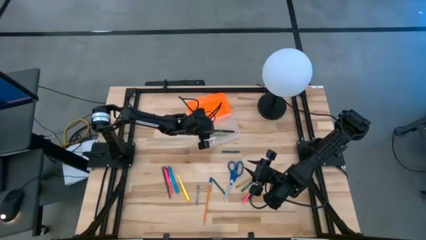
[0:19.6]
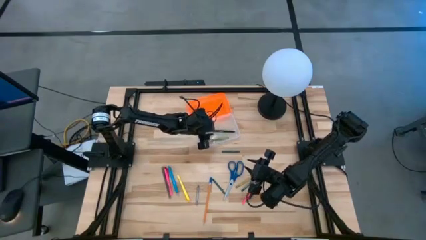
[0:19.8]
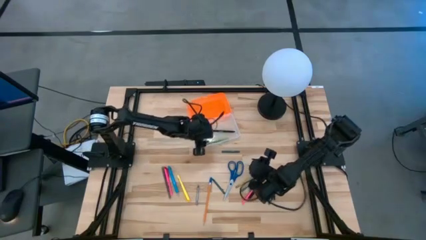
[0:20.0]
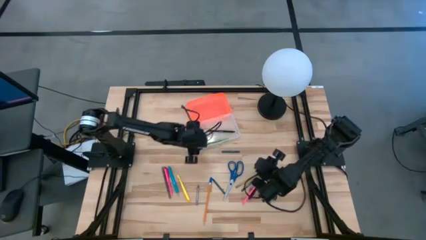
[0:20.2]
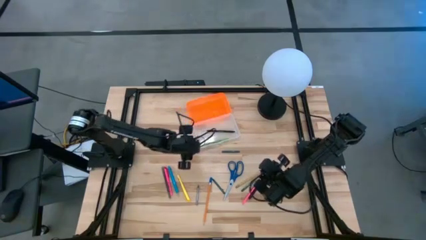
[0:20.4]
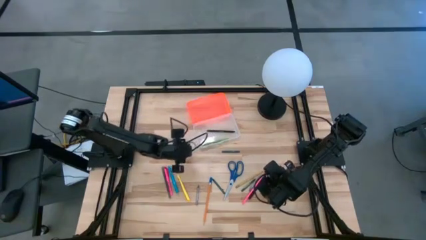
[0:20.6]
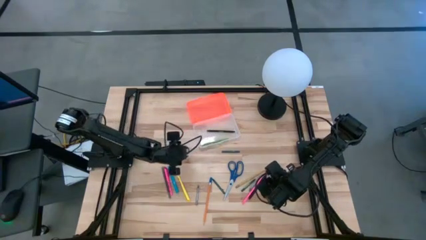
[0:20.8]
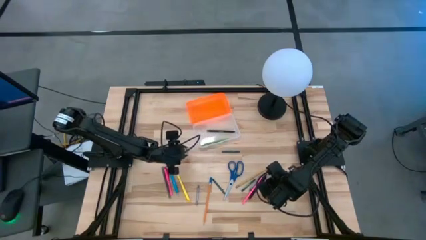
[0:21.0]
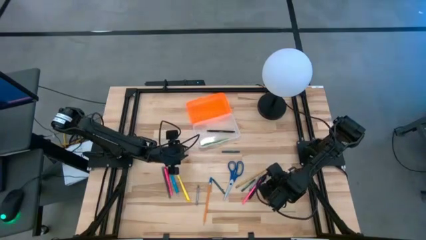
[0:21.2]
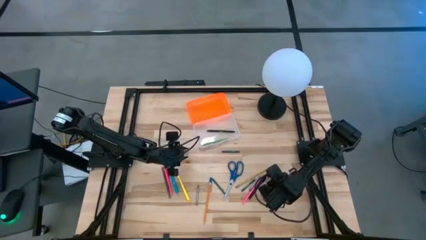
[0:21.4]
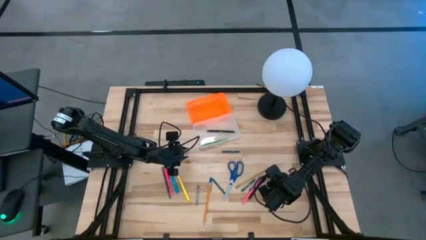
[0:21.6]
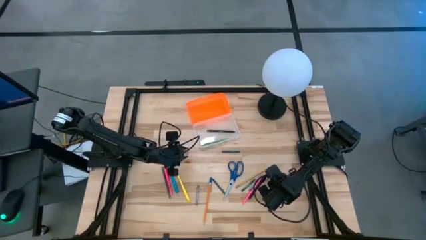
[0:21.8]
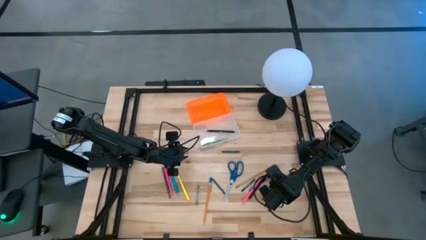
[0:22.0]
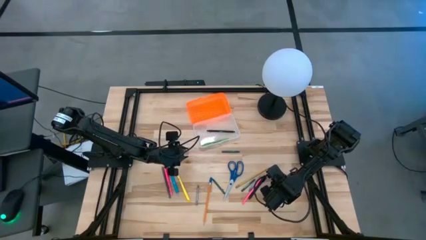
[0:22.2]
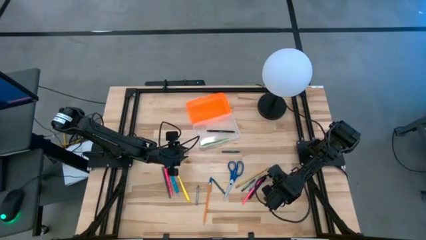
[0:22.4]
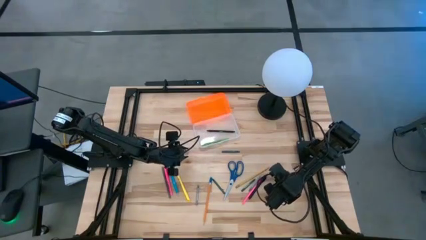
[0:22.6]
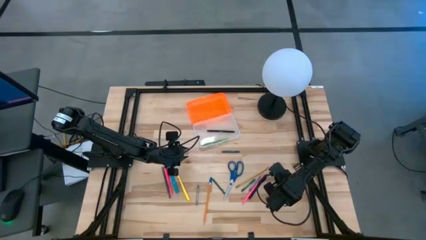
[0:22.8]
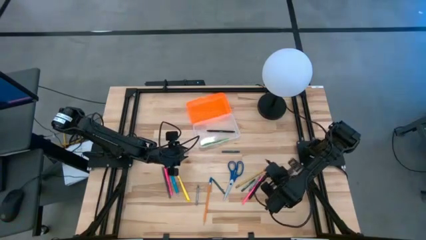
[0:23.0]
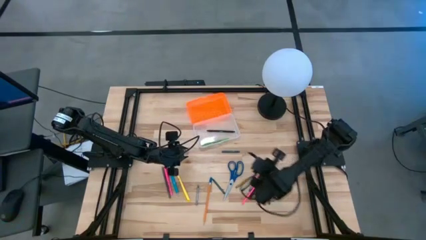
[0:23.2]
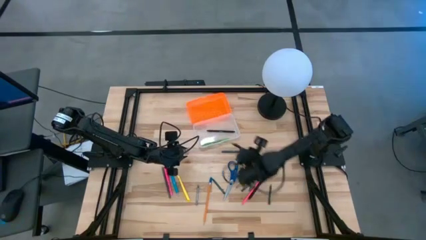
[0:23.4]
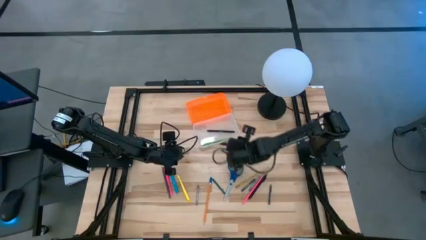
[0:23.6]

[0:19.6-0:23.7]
Task: Pick & place school supplies into a supply box
Put the right black pen into the supply box

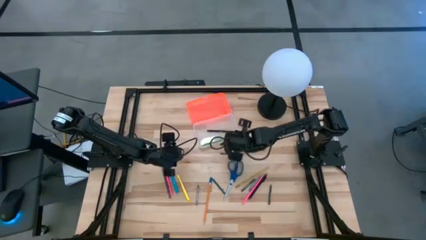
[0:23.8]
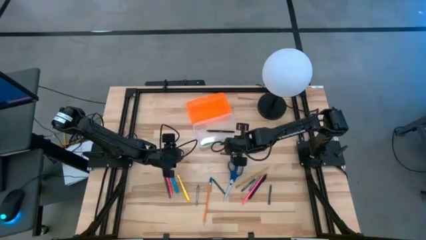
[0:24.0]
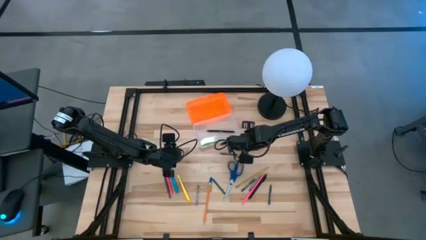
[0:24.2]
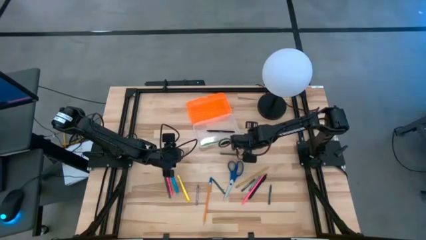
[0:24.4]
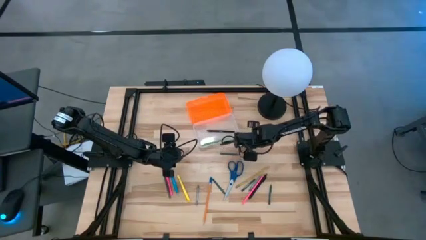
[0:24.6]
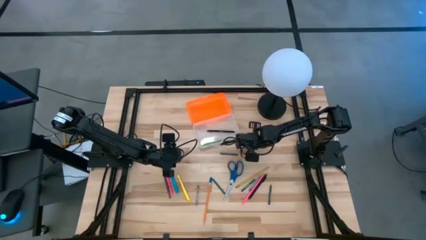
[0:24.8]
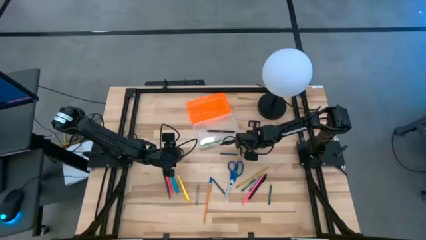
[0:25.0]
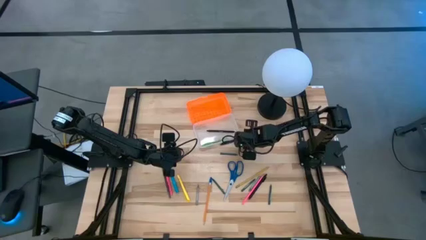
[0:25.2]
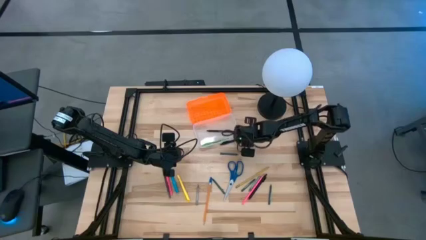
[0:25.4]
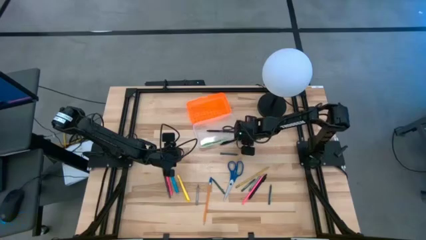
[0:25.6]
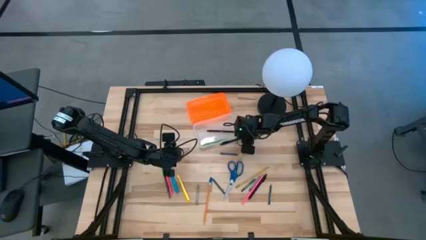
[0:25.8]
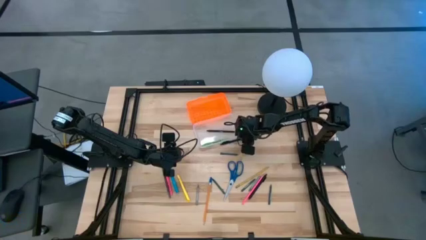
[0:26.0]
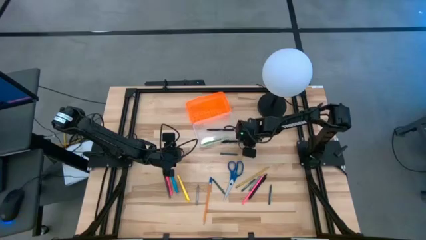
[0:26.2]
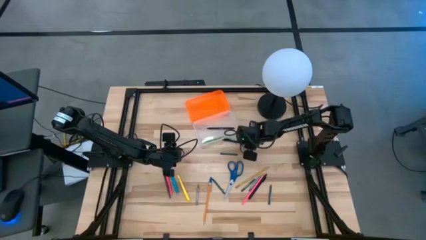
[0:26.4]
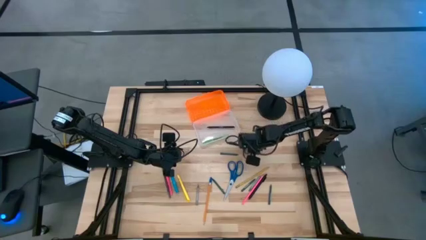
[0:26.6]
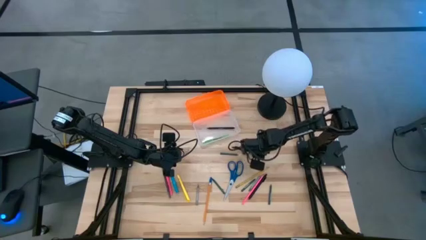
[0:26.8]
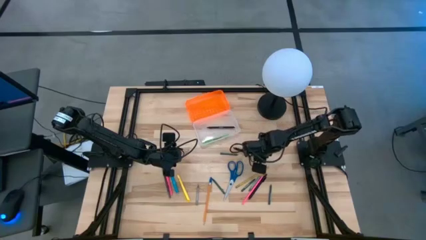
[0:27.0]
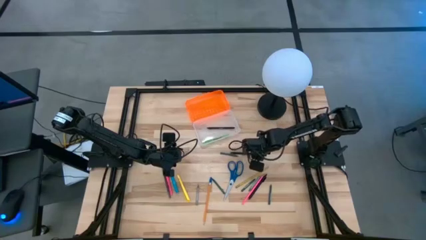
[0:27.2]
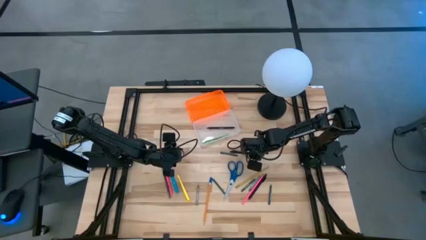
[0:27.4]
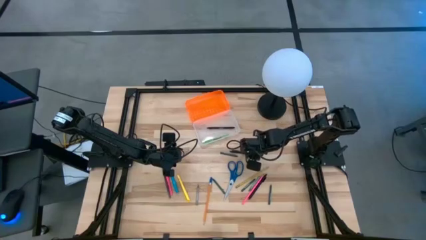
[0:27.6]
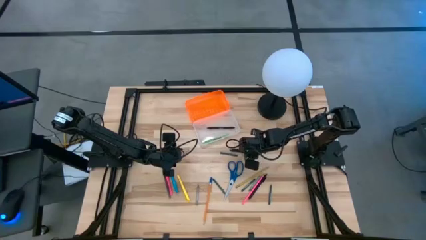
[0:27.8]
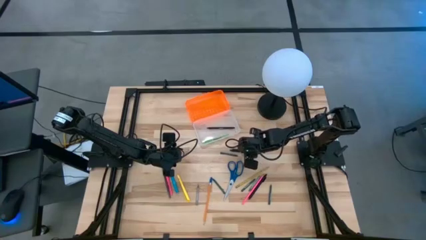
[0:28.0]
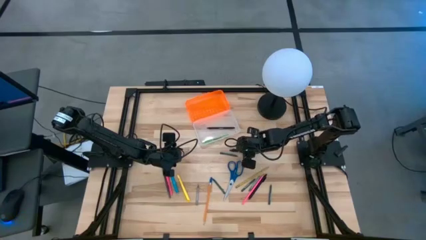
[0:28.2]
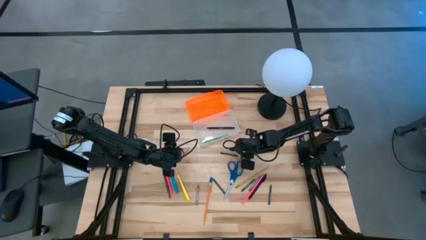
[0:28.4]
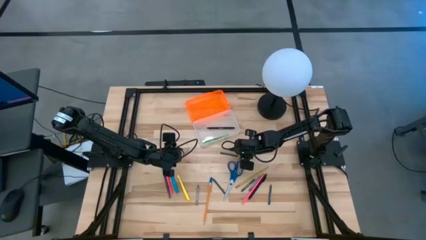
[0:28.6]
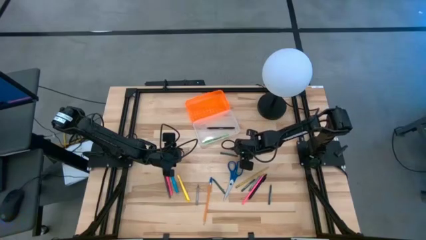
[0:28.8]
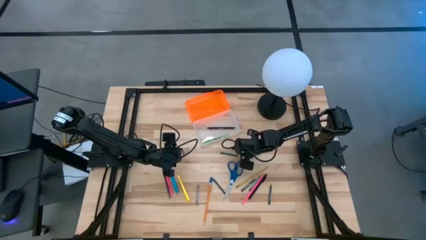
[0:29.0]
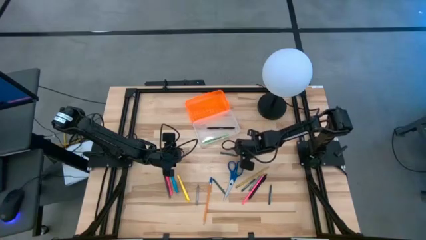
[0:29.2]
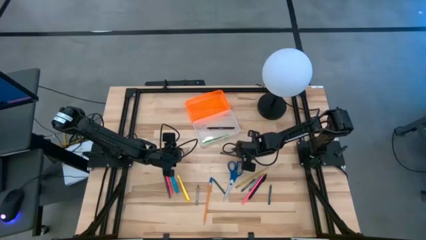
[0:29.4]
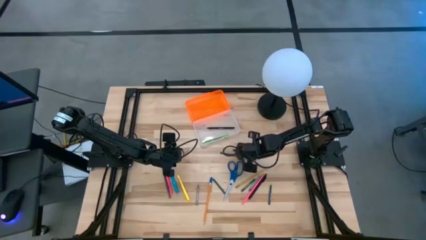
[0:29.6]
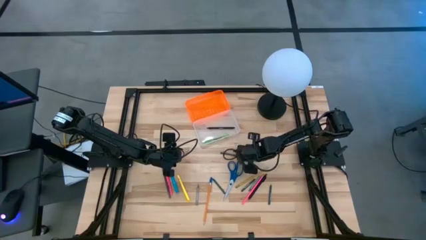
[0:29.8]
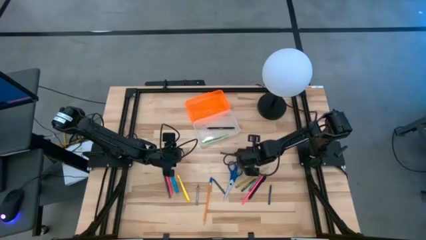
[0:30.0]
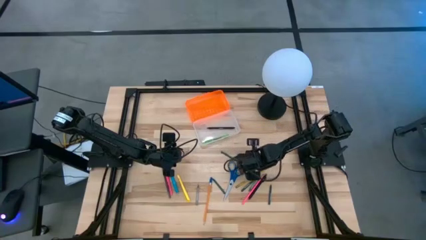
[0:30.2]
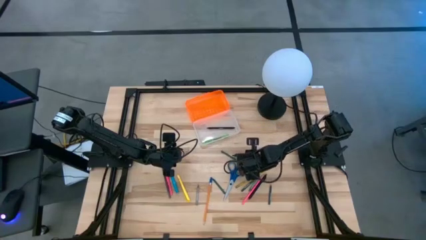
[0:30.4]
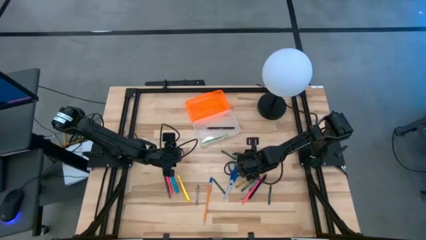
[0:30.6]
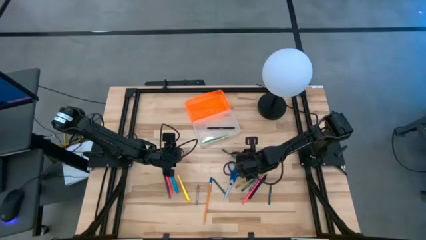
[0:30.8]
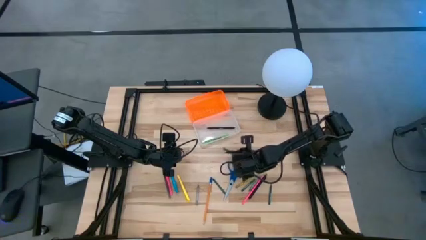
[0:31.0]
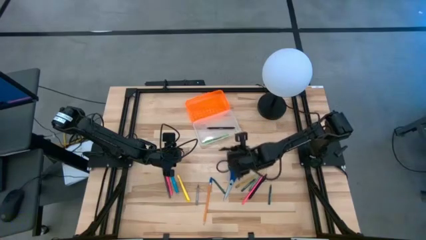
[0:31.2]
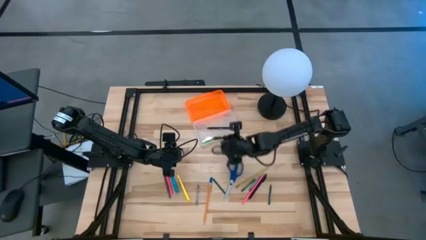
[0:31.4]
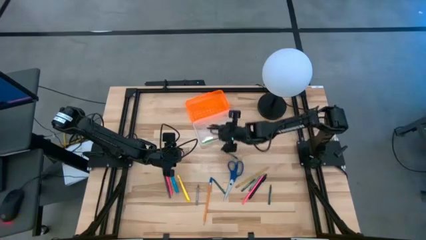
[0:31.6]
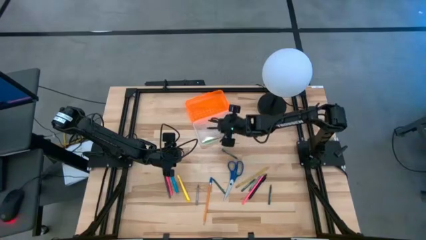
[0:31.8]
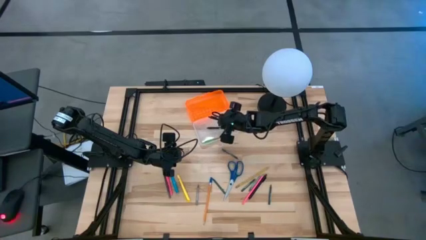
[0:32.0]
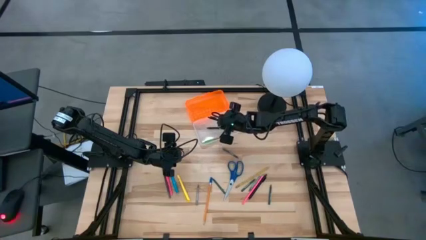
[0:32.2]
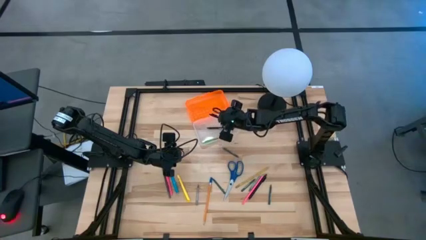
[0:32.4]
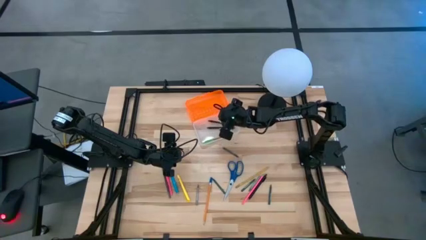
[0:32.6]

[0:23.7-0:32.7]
Put the right black pen into the supply box
